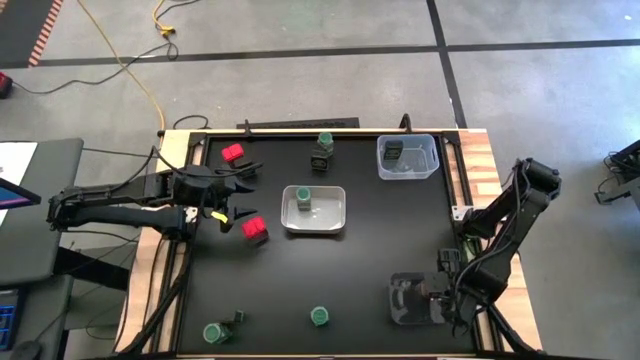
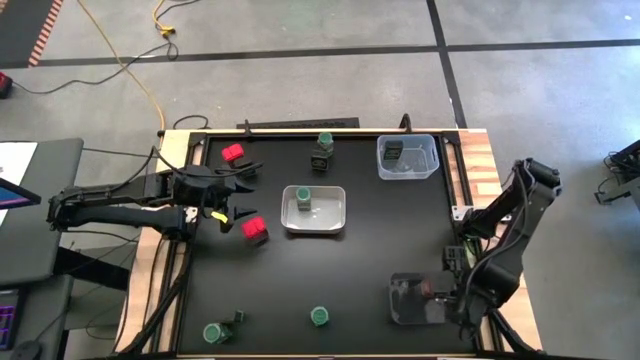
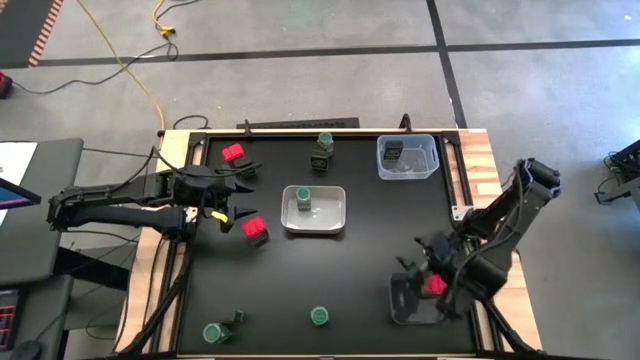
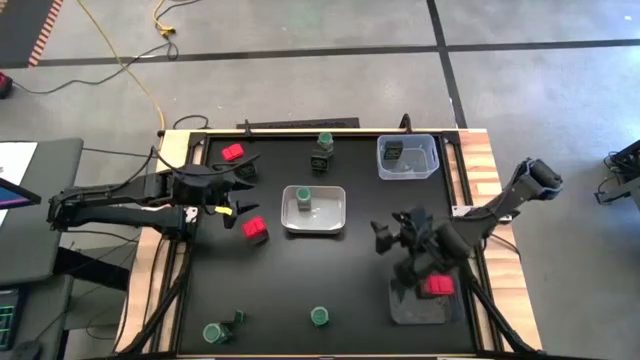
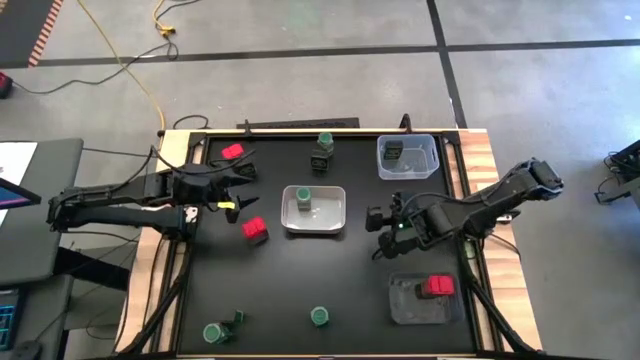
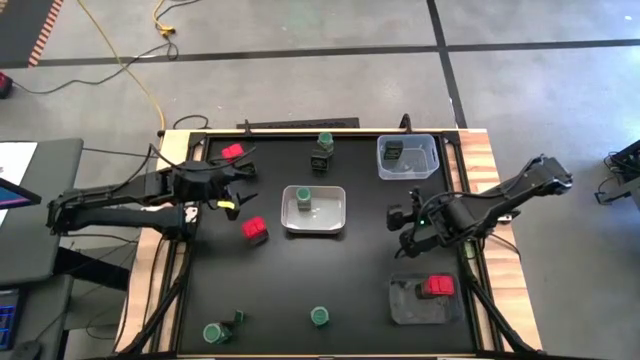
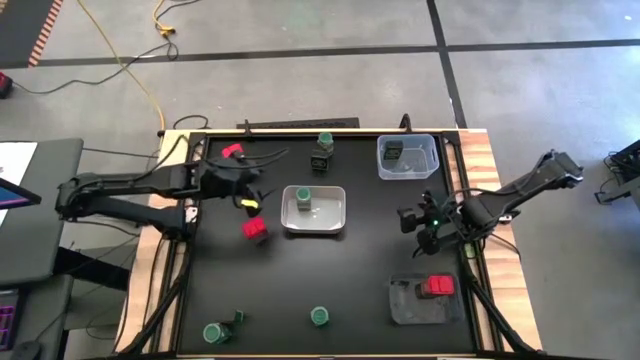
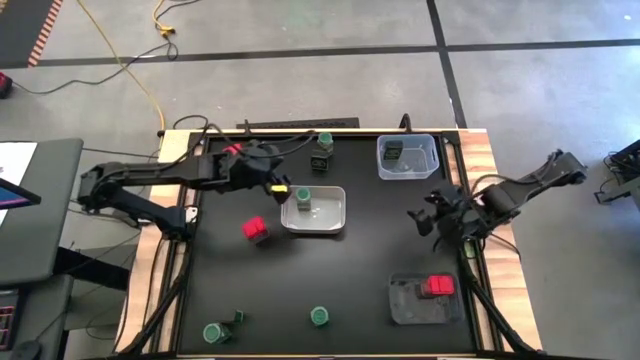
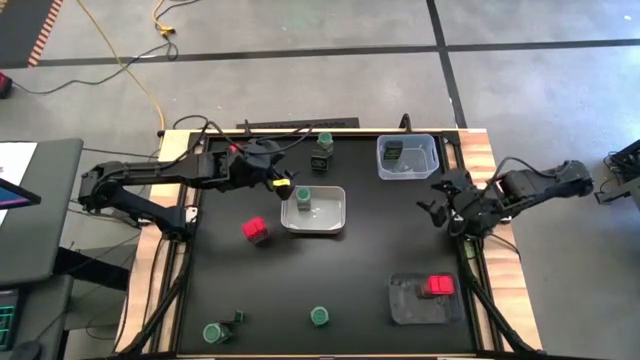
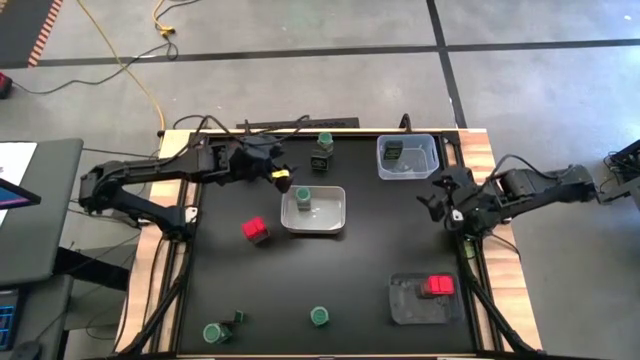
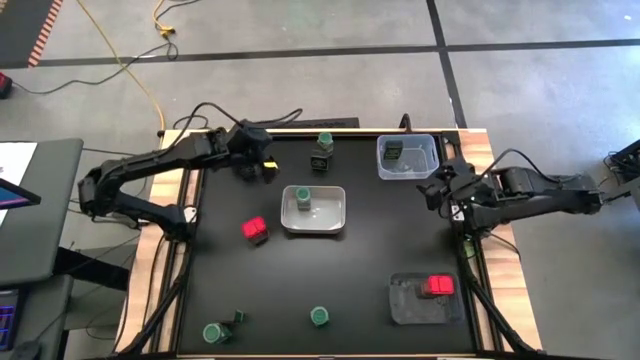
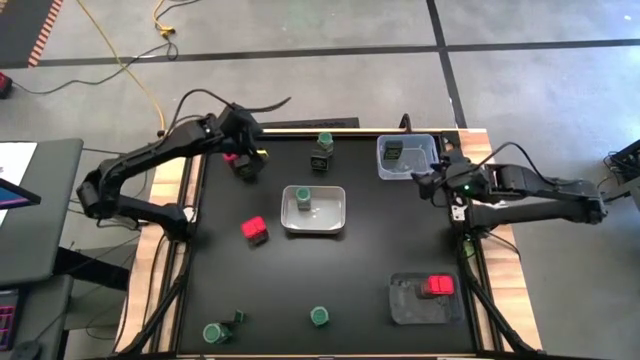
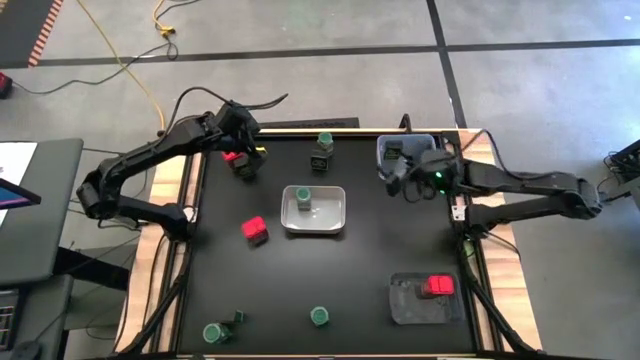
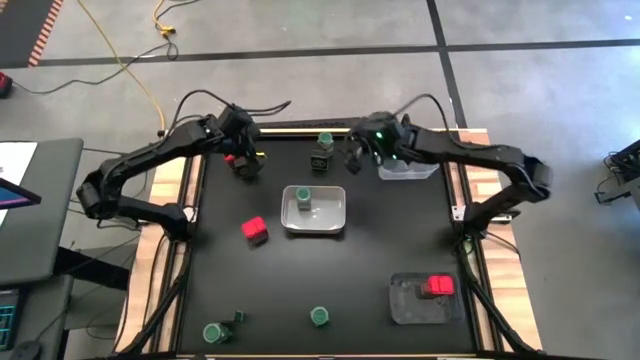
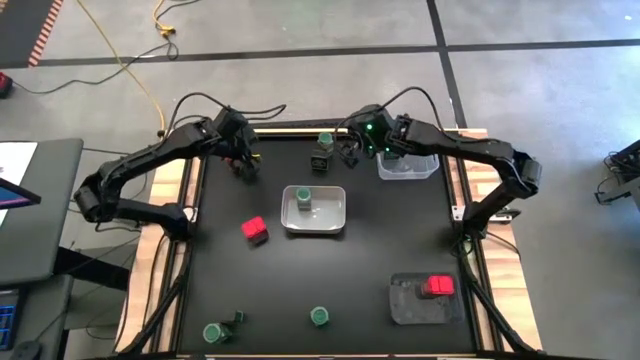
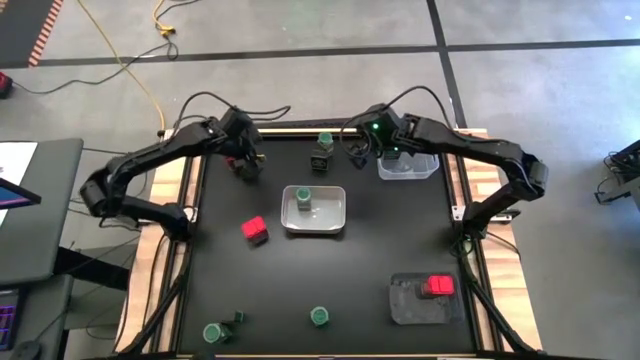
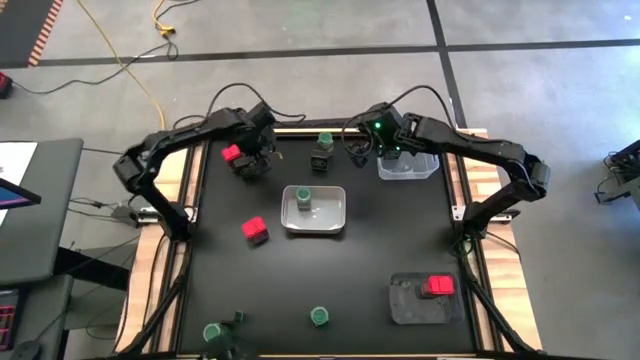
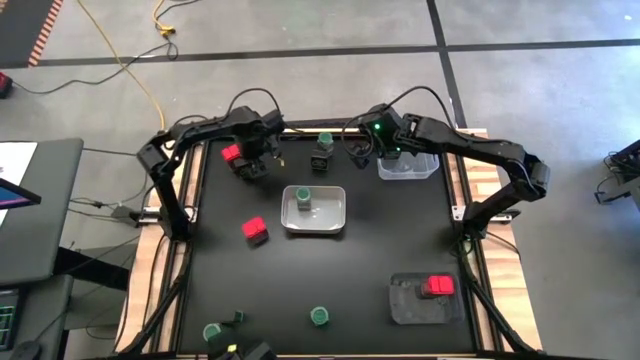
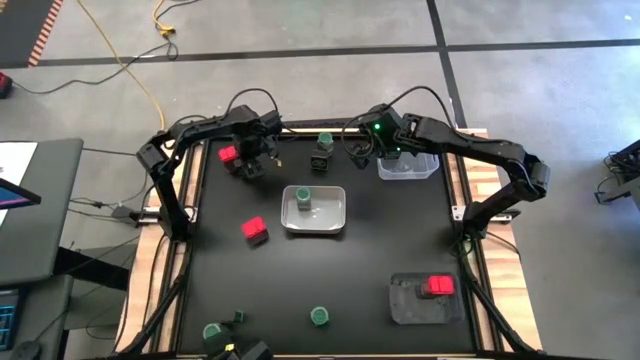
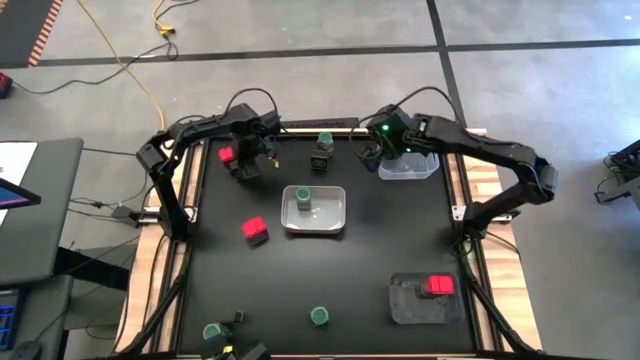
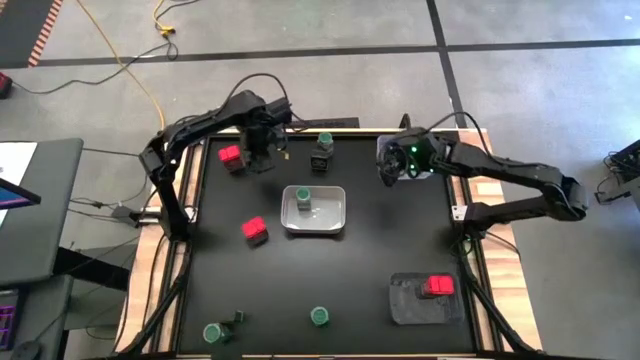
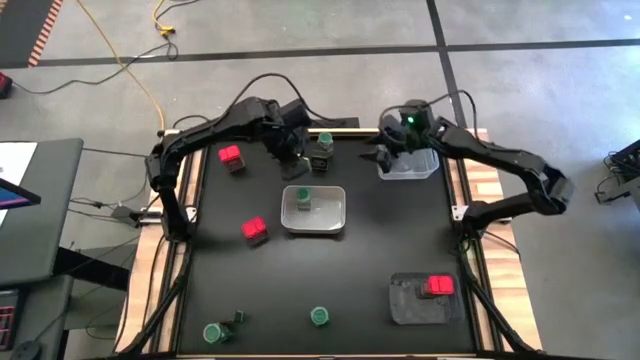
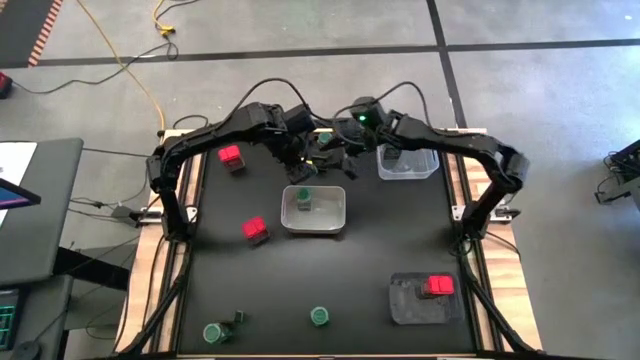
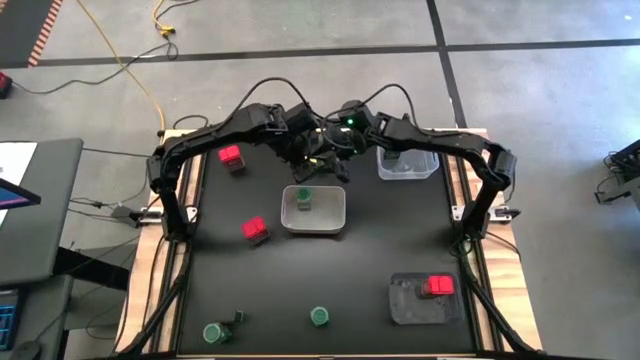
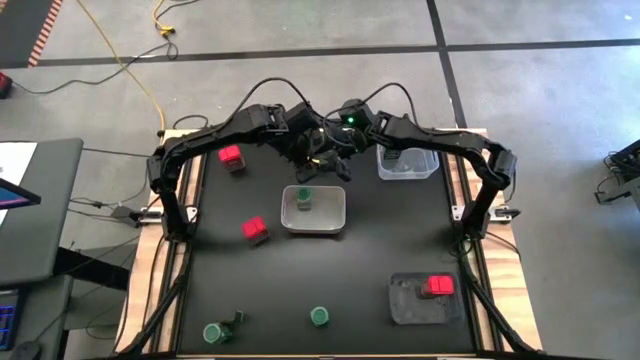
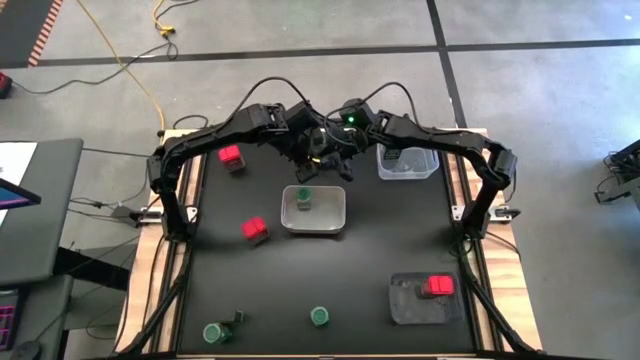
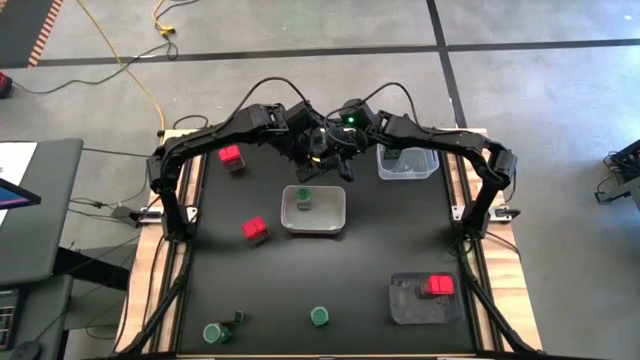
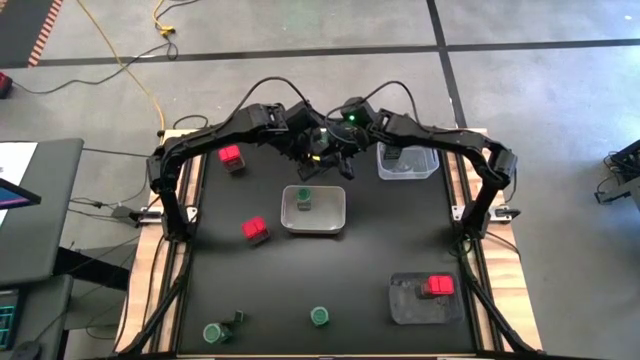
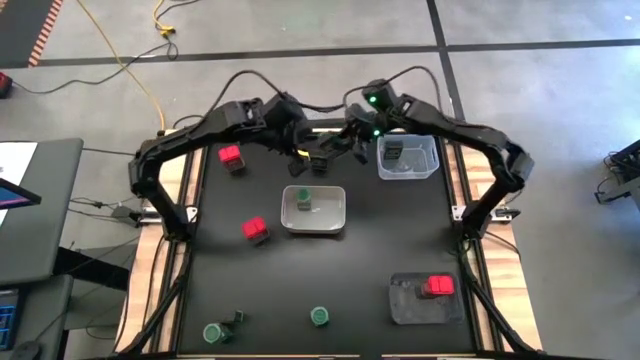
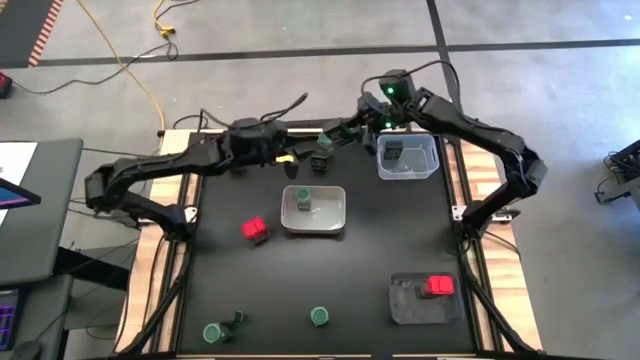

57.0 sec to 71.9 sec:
Task: Sort spices by type
Put the top left black seasoning can into the transparent bin

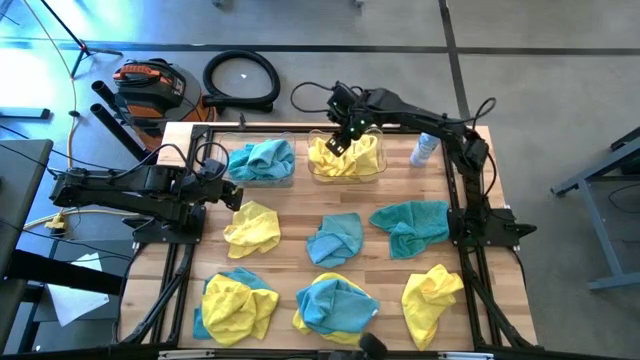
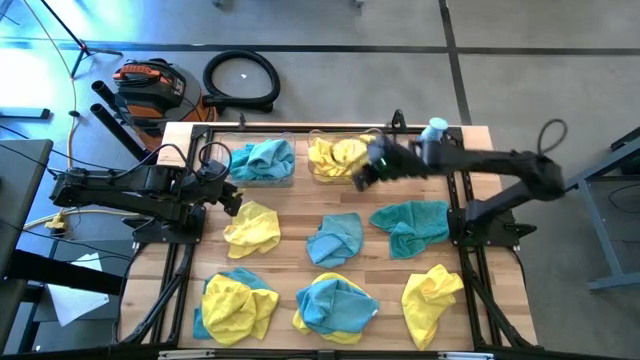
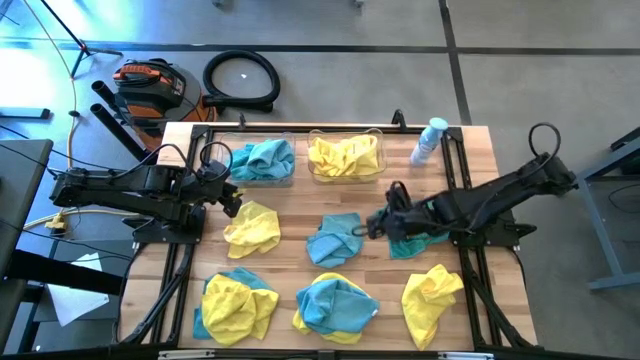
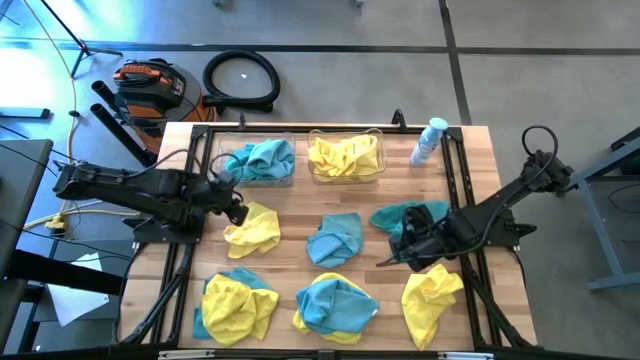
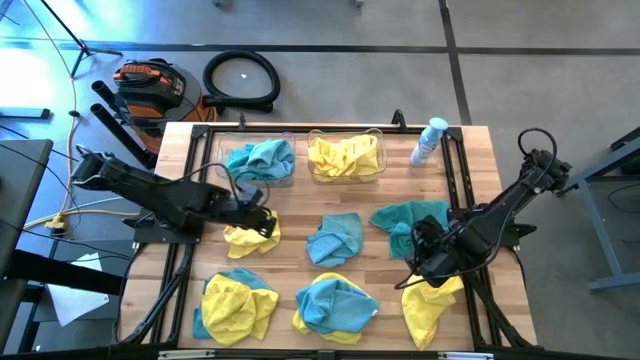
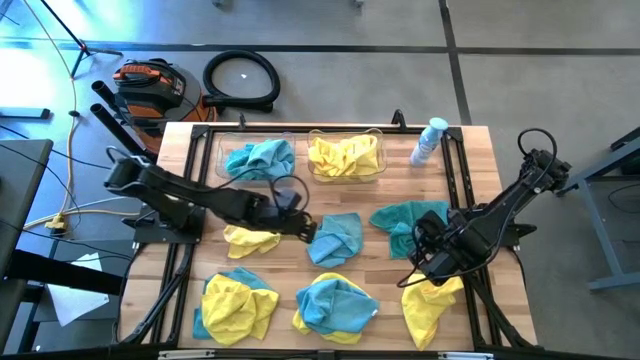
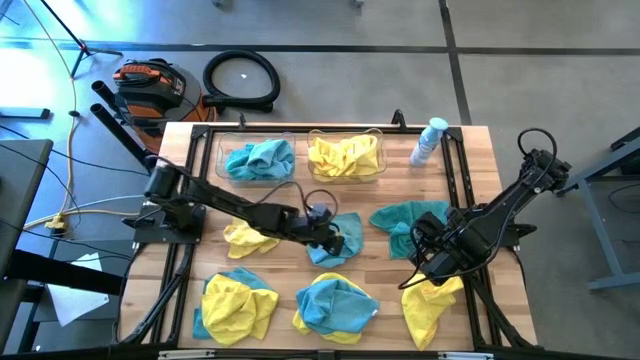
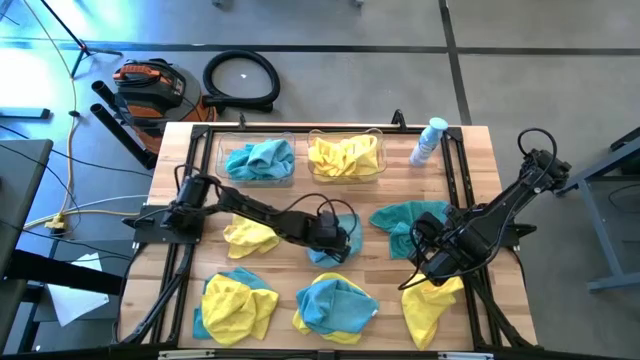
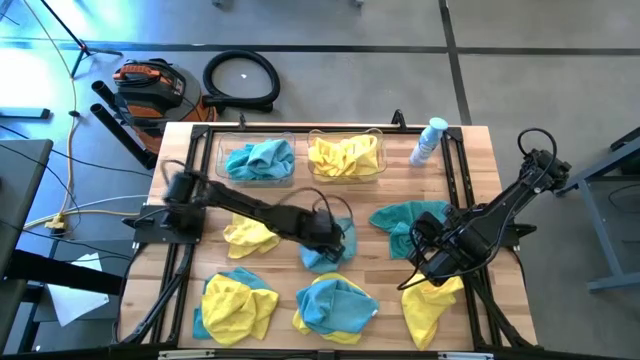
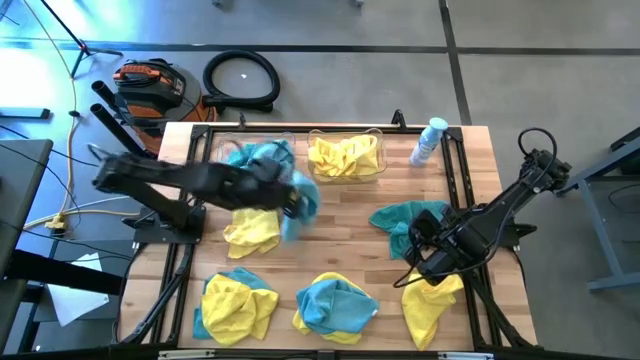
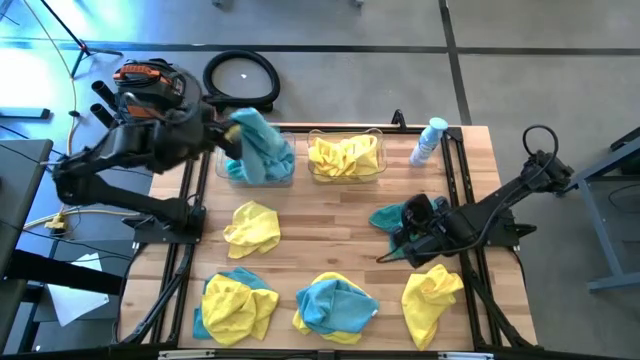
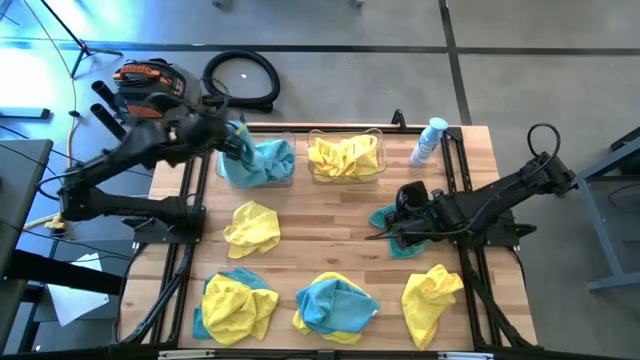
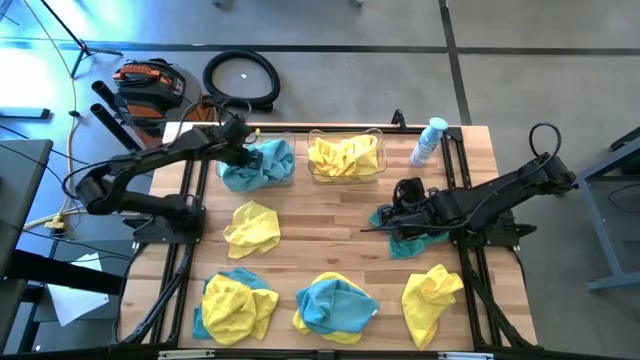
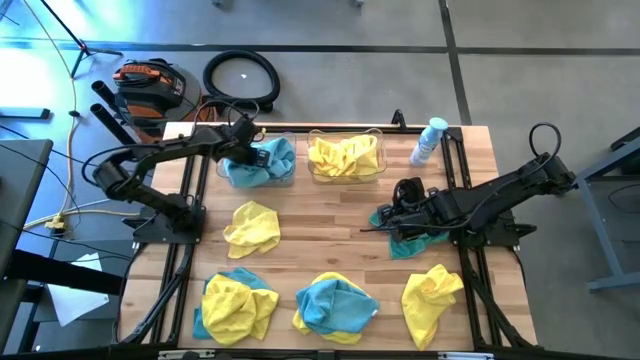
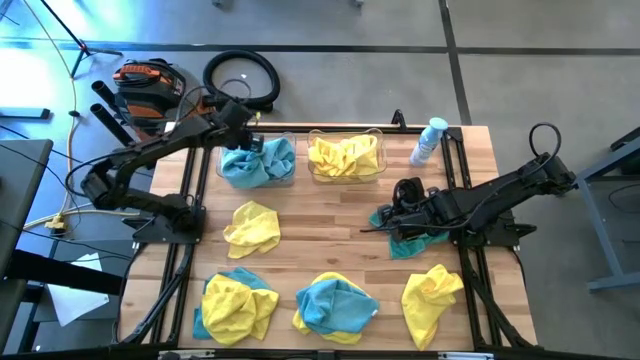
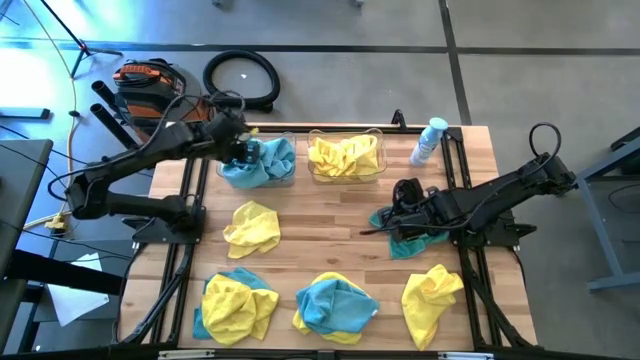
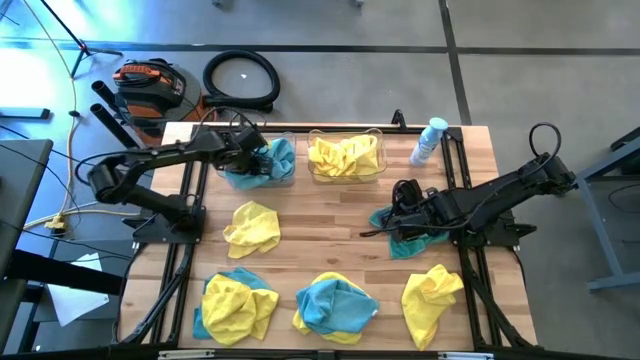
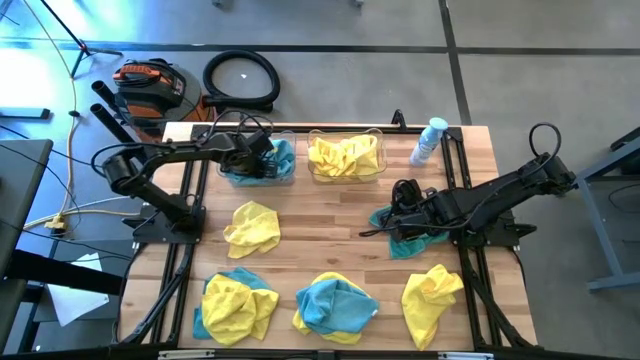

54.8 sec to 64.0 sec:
Task: Sort microfiber towel by color & place in baskets
Put the blue towel into the left transparent bin
